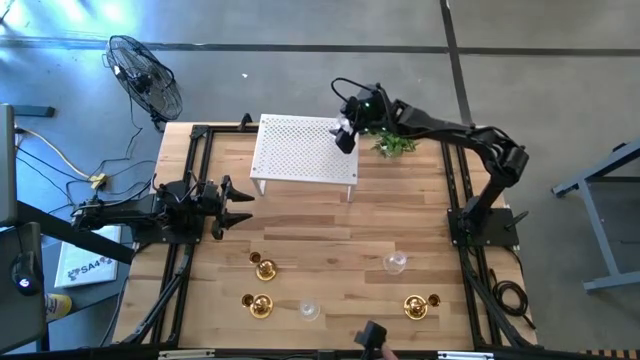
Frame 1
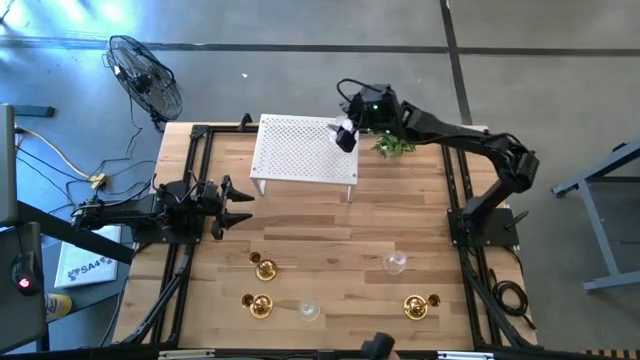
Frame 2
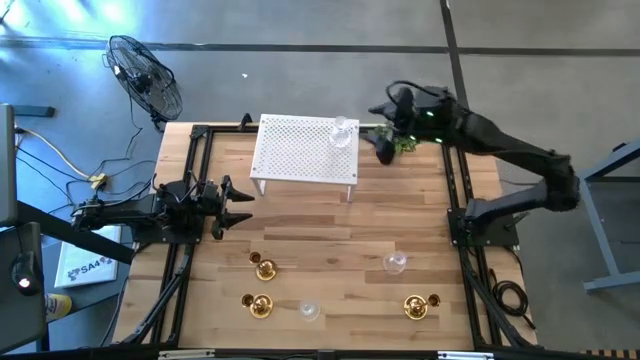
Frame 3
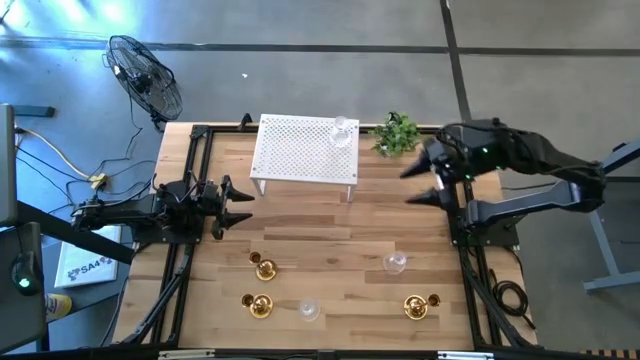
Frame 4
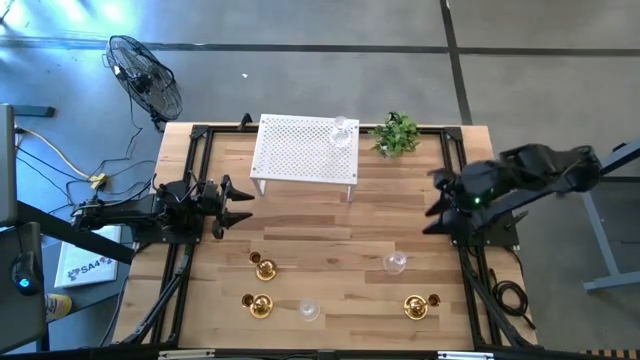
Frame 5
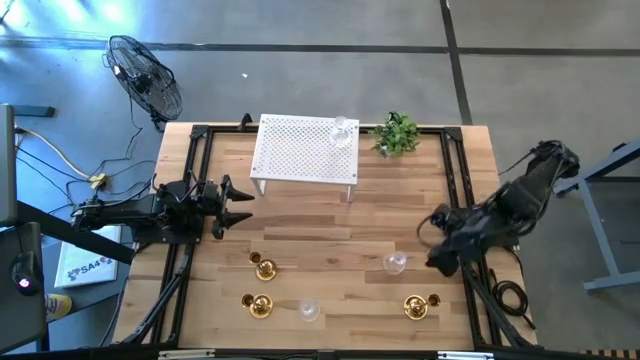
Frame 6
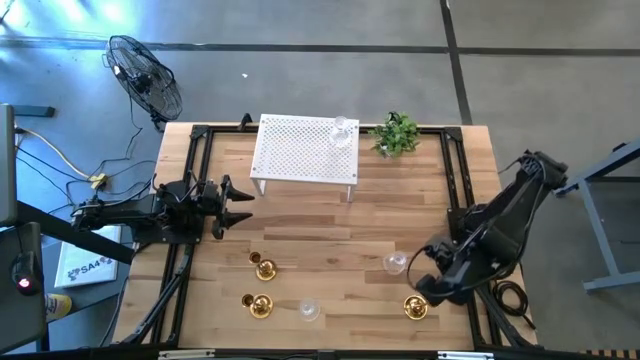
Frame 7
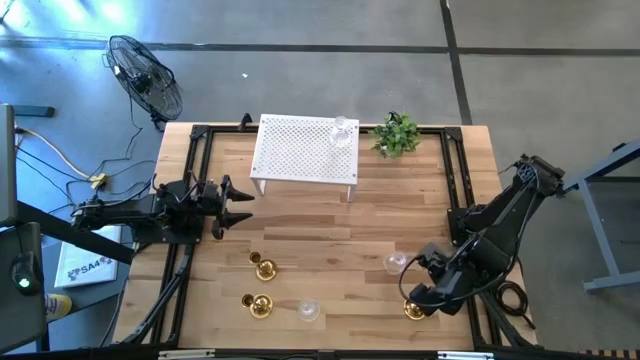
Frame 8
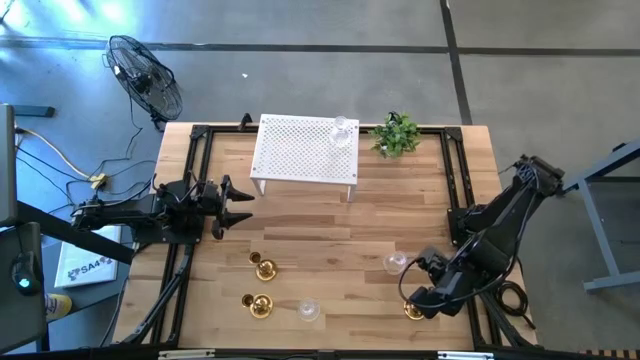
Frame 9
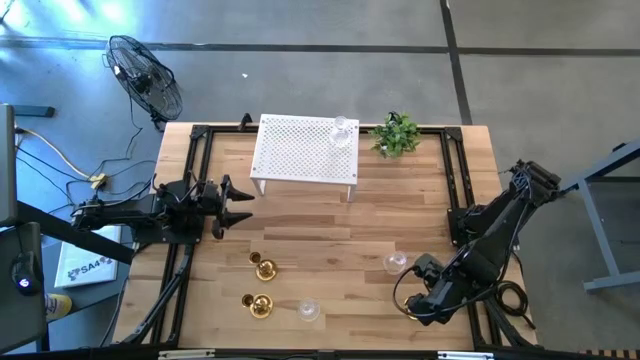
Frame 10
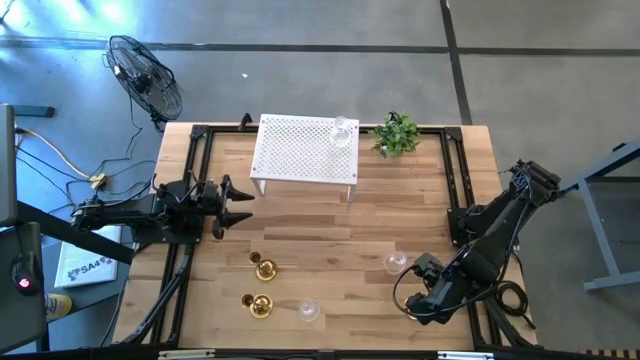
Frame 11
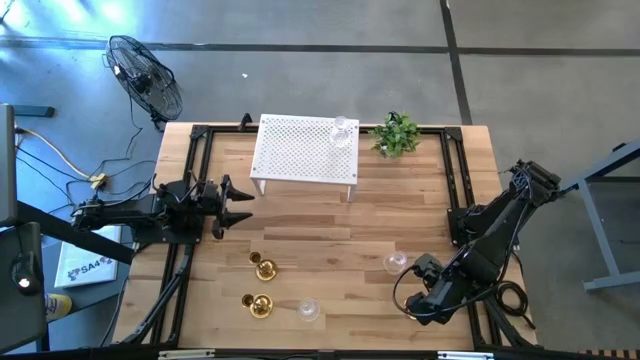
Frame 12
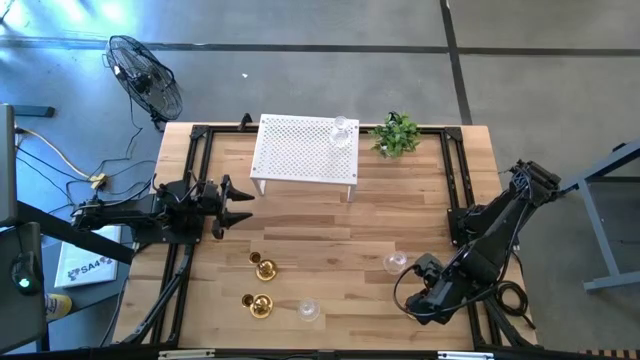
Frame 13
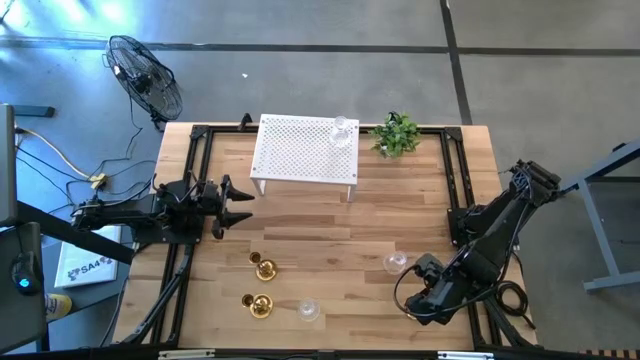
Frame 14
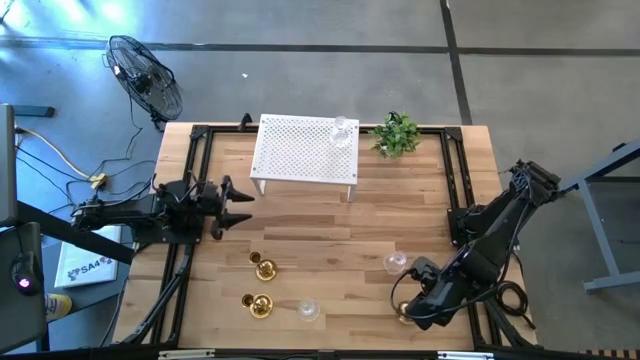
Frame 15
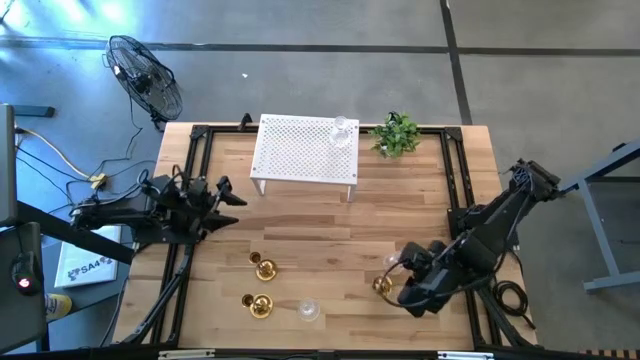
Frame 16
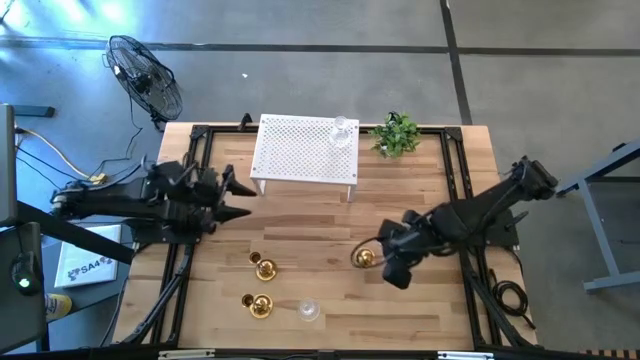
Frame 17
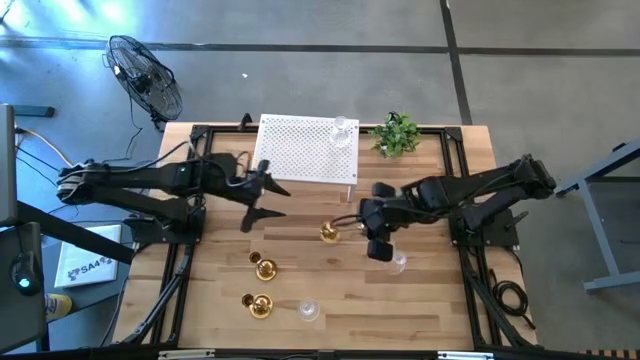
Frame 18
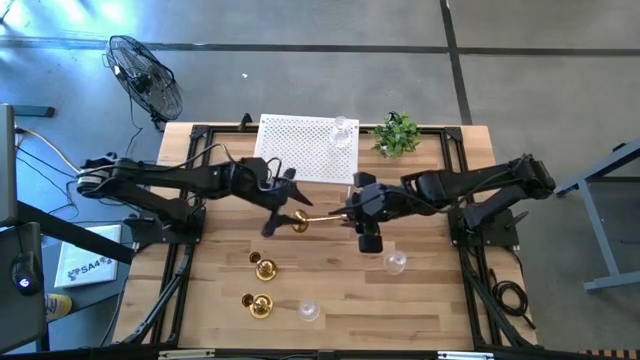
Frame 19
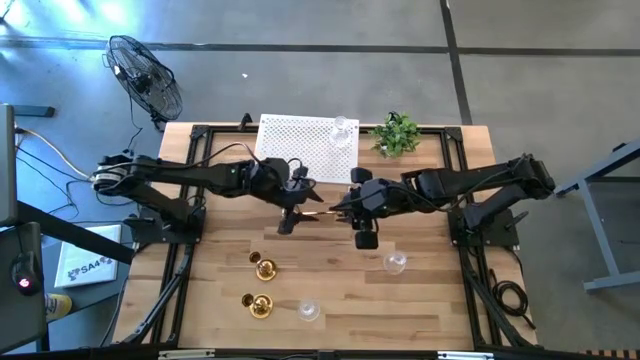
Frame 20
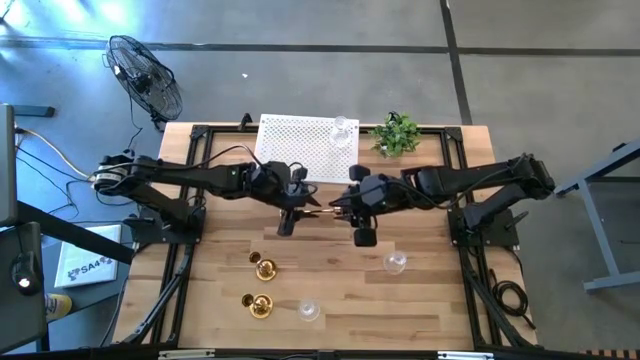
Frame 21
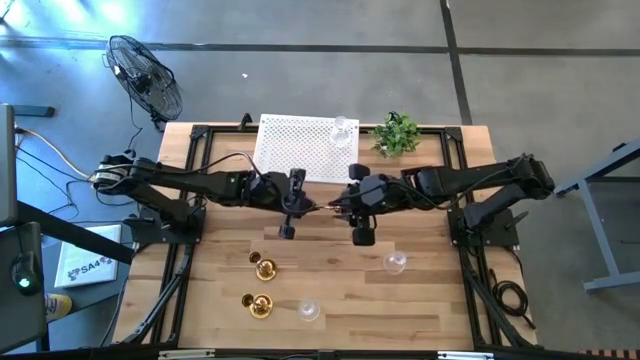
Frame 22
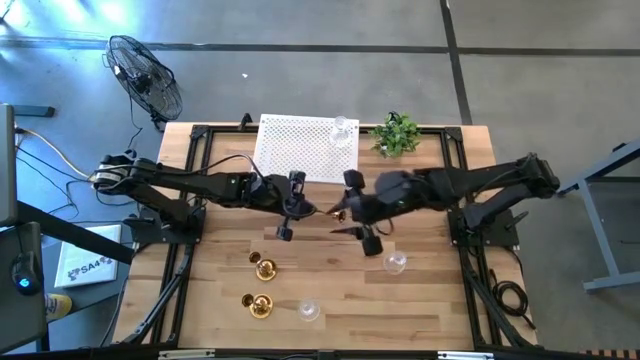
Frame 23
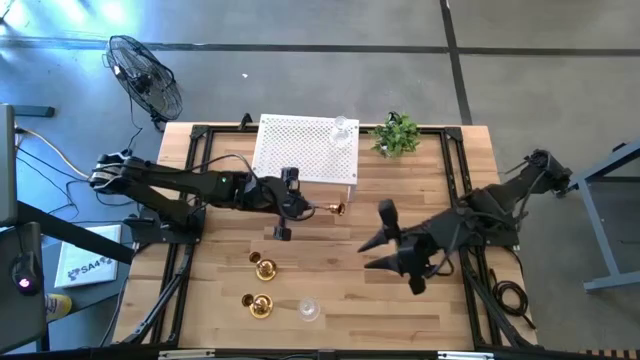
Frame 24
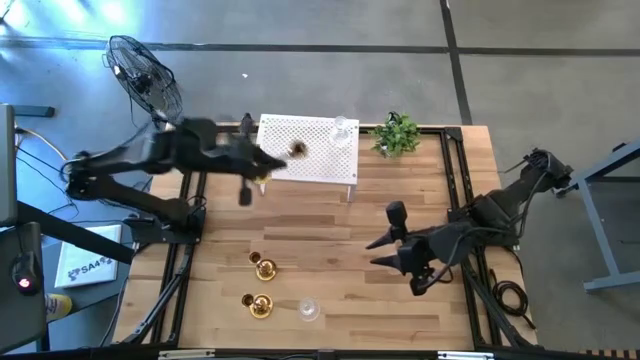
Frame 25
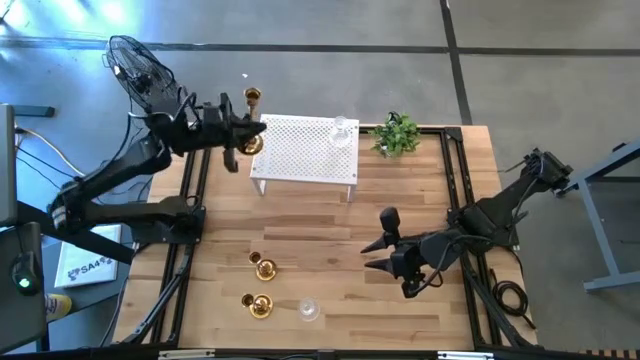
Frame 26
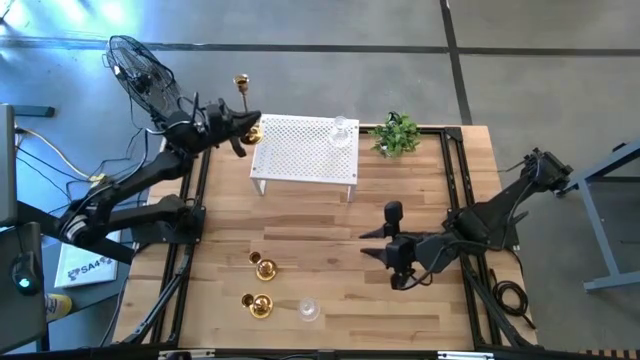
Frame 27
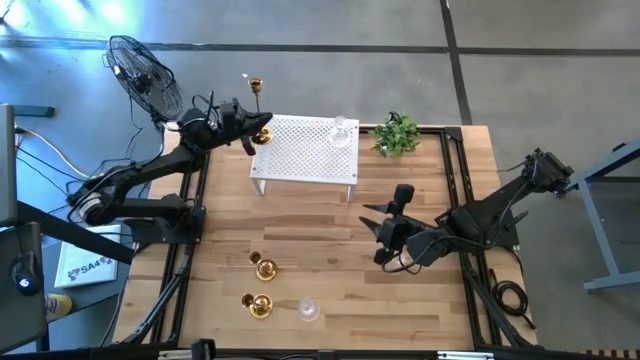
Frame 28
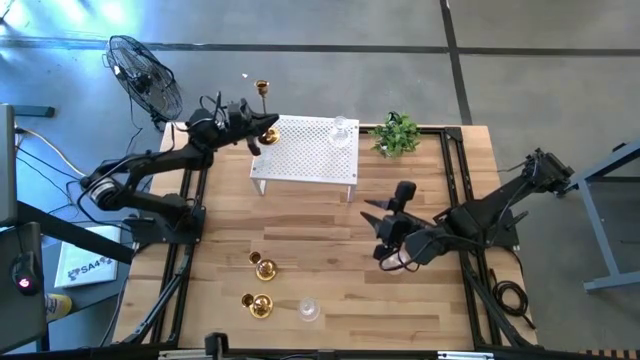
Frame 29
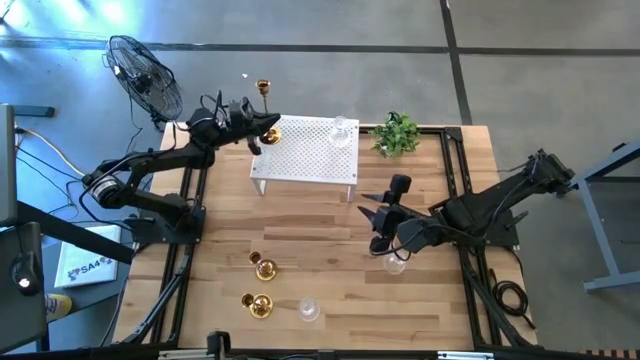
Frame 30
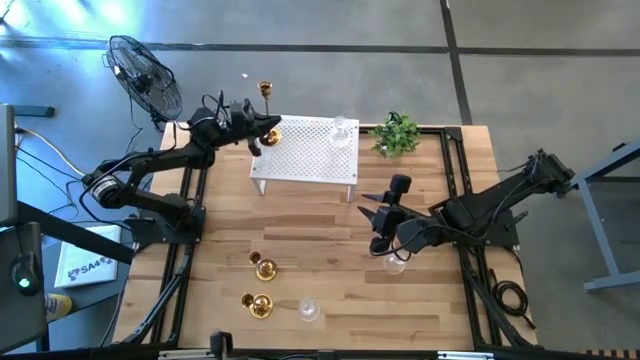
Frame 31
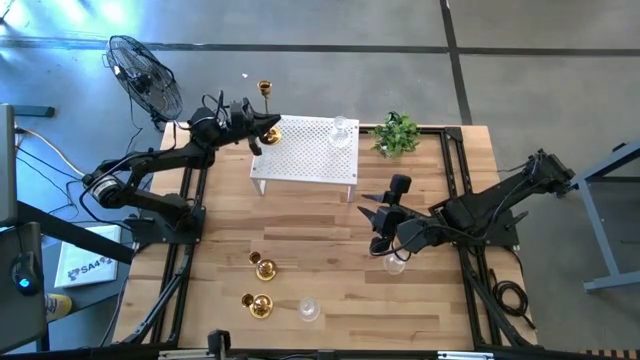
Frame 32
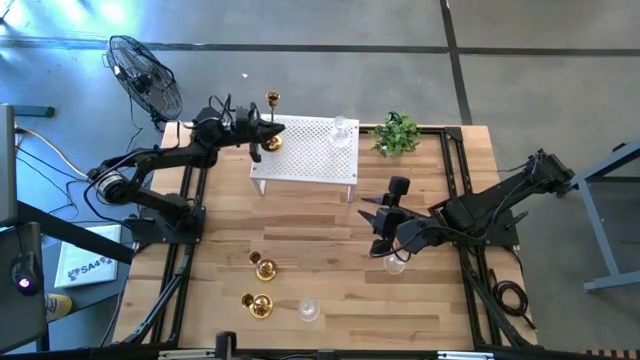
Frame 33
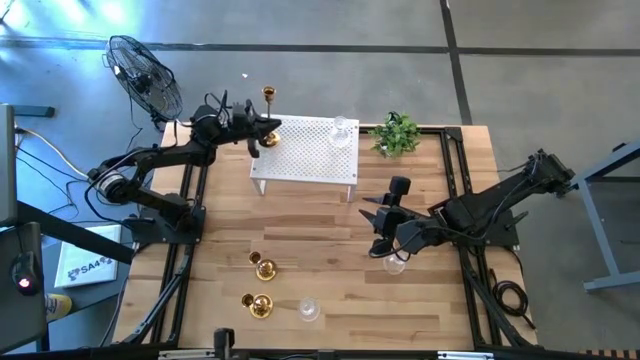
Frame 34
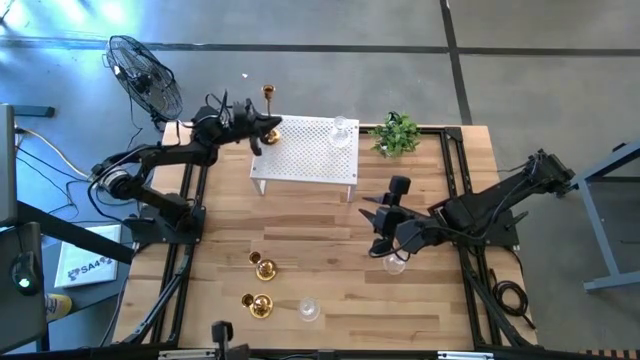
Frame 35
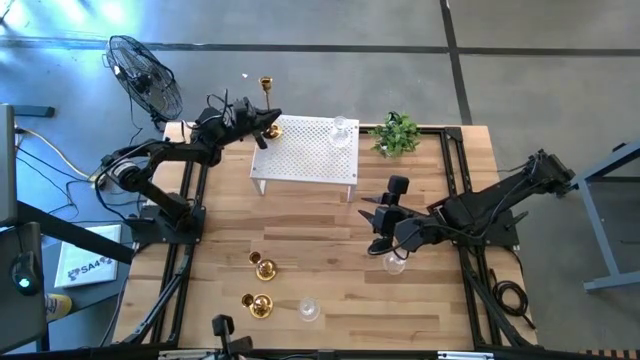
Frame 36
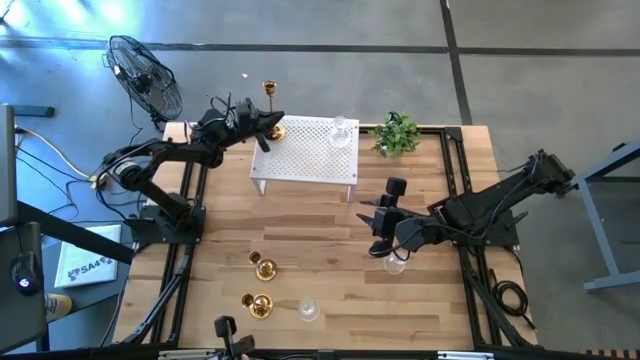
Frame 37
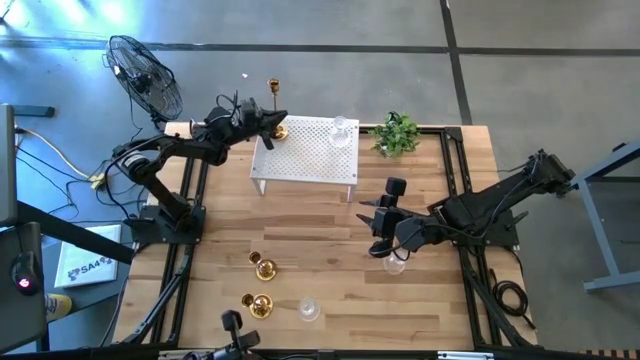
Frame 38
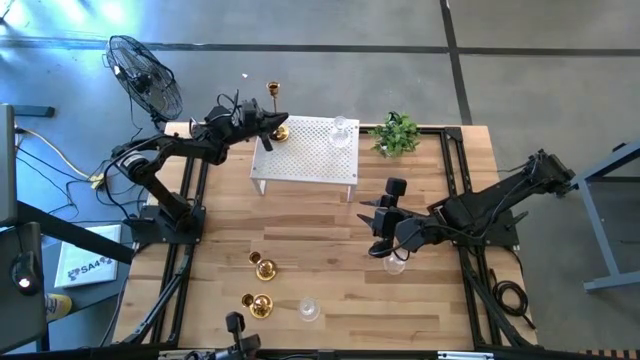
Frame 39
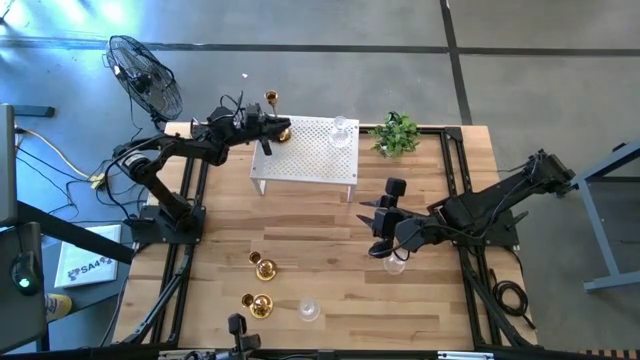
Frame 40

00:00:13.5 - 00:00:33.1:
Task: Pick & Place candle stick holders
Put the bottom right gold candle holder on the shelf
